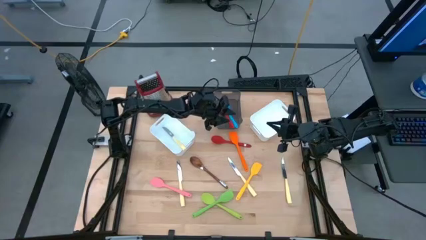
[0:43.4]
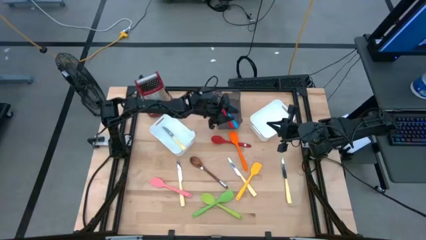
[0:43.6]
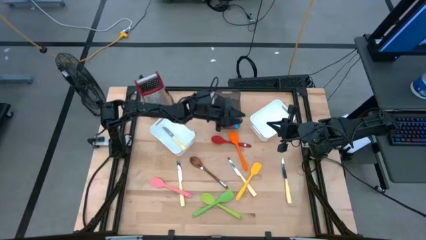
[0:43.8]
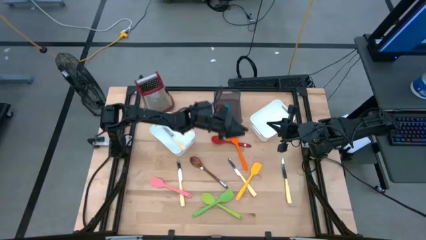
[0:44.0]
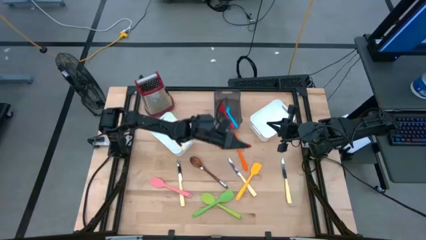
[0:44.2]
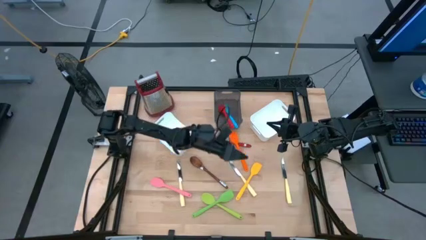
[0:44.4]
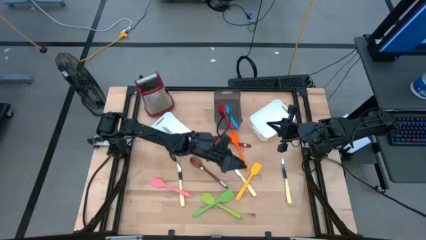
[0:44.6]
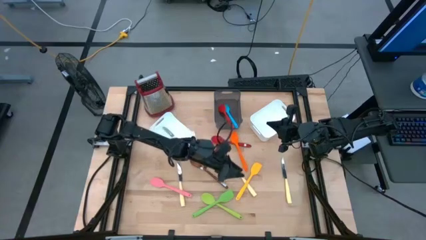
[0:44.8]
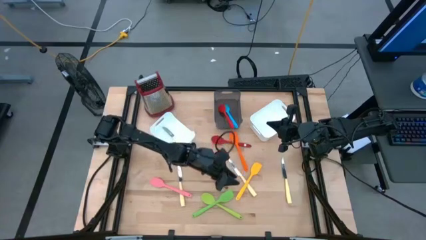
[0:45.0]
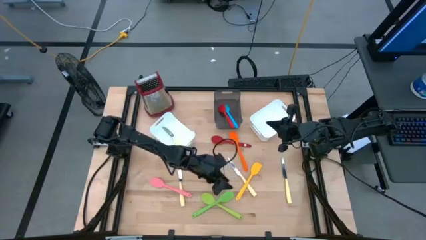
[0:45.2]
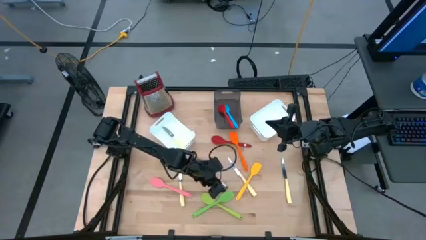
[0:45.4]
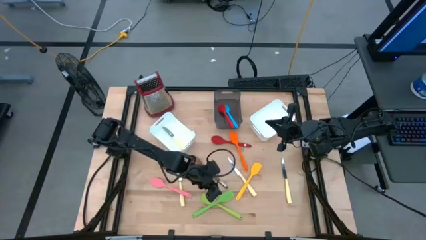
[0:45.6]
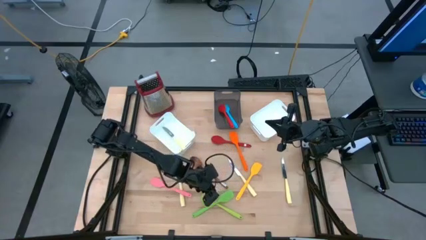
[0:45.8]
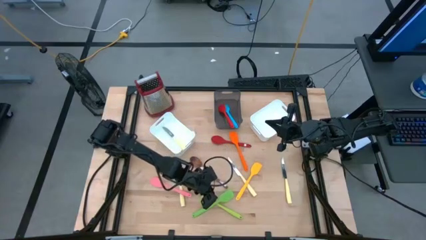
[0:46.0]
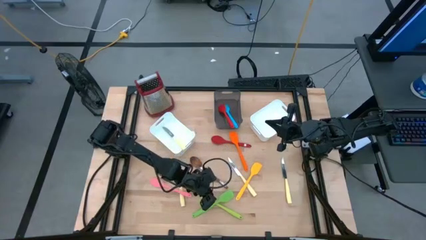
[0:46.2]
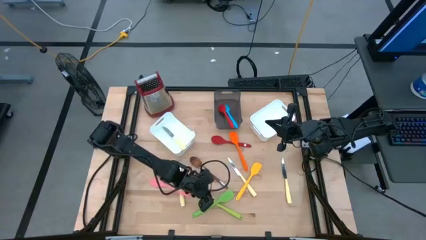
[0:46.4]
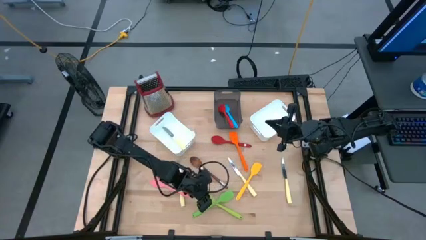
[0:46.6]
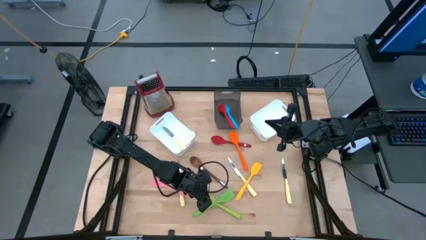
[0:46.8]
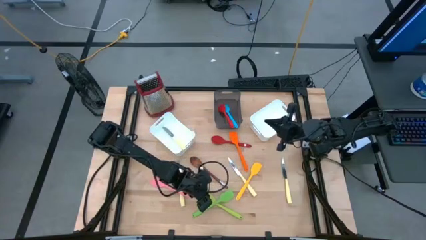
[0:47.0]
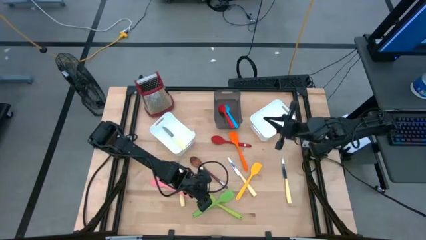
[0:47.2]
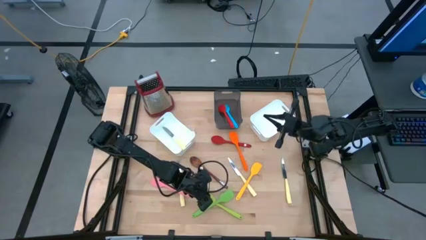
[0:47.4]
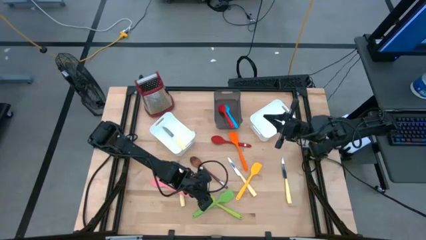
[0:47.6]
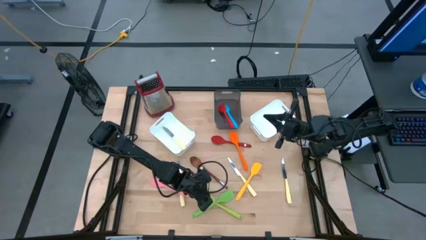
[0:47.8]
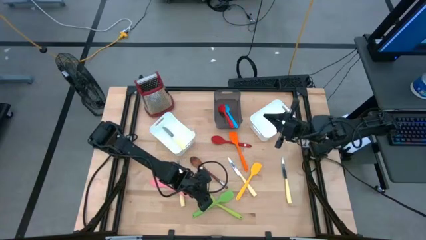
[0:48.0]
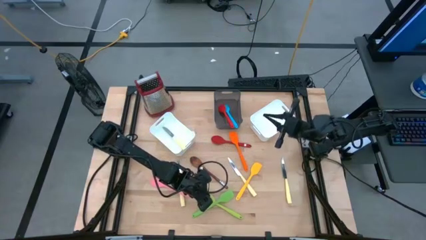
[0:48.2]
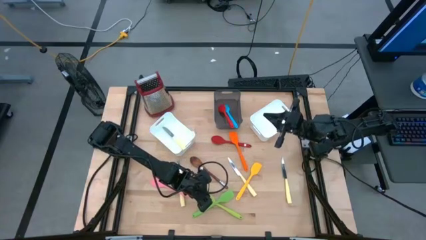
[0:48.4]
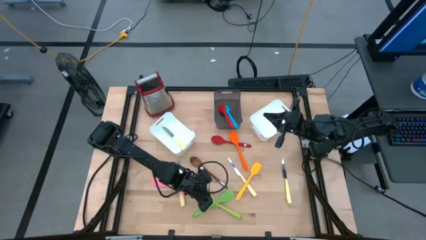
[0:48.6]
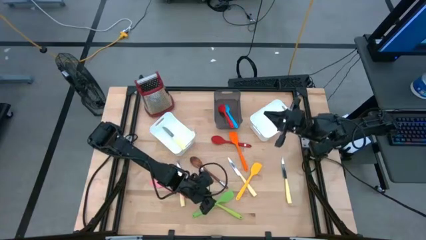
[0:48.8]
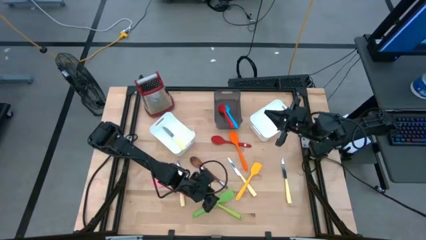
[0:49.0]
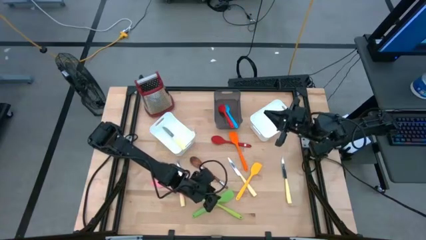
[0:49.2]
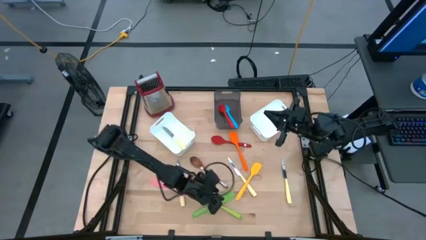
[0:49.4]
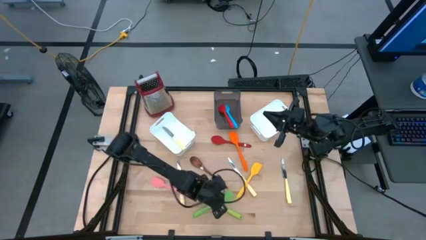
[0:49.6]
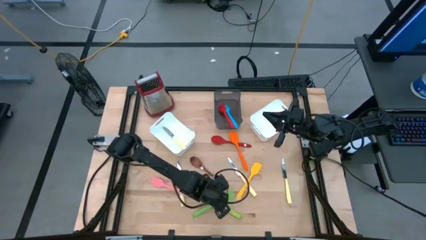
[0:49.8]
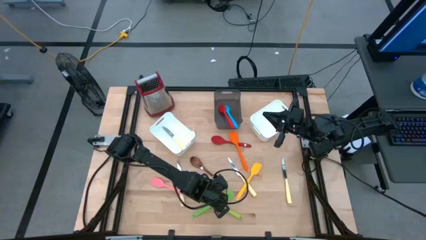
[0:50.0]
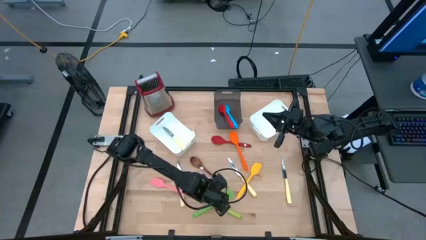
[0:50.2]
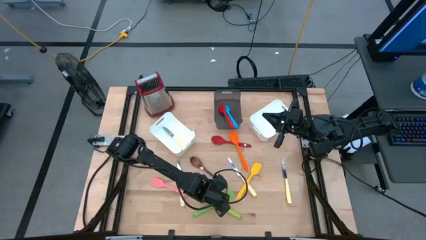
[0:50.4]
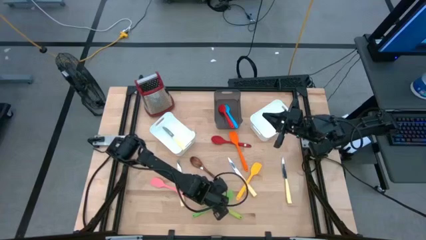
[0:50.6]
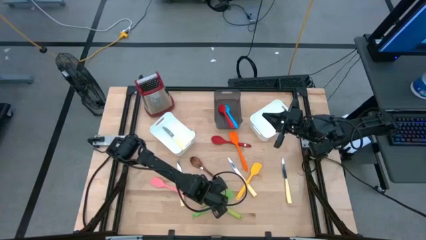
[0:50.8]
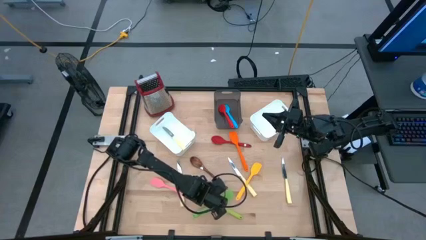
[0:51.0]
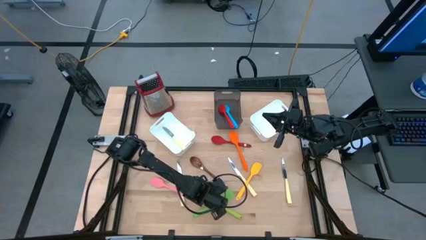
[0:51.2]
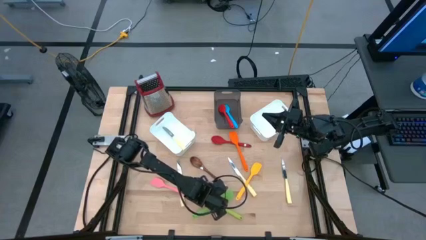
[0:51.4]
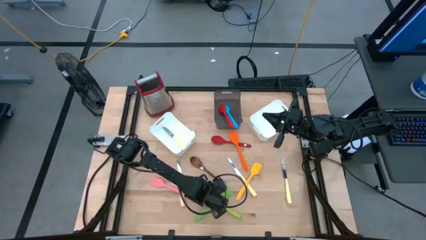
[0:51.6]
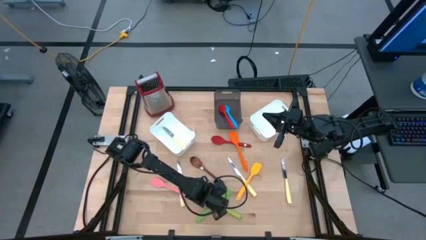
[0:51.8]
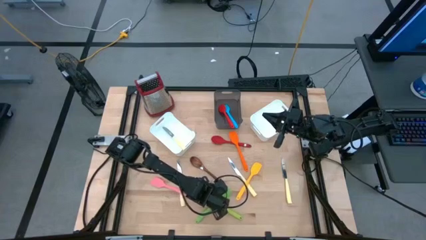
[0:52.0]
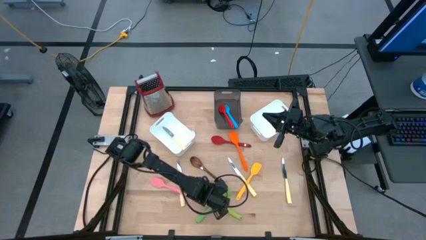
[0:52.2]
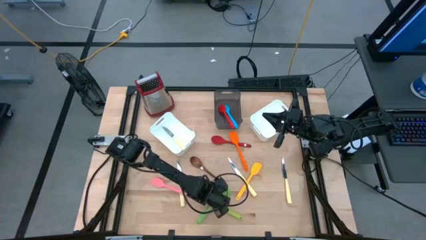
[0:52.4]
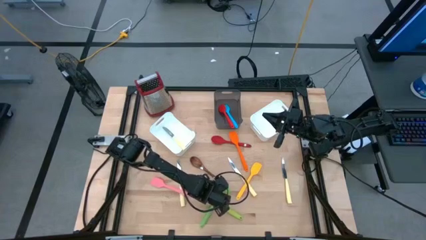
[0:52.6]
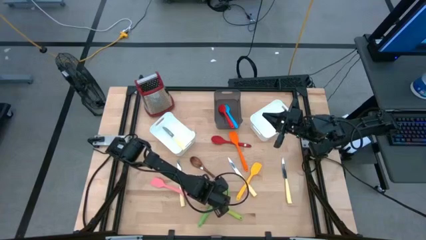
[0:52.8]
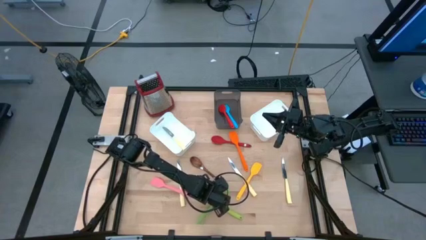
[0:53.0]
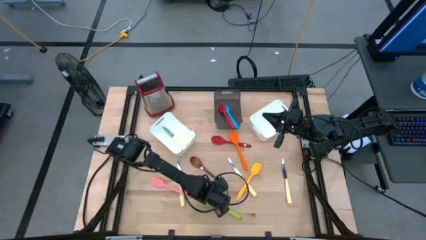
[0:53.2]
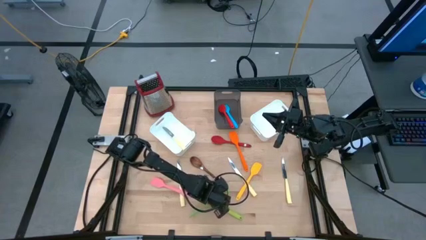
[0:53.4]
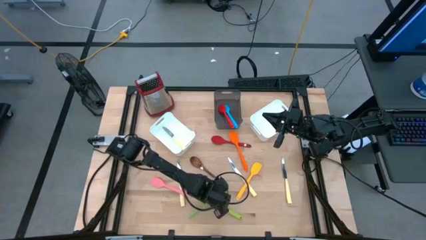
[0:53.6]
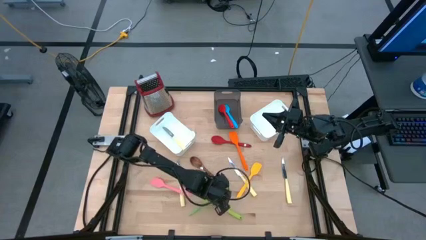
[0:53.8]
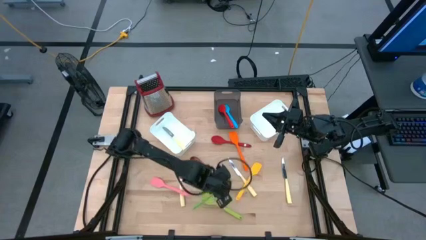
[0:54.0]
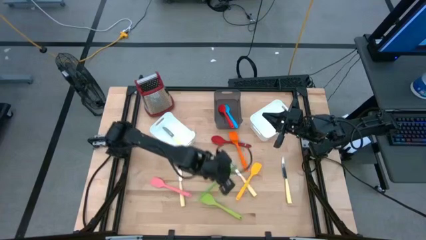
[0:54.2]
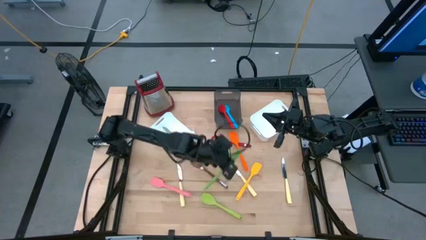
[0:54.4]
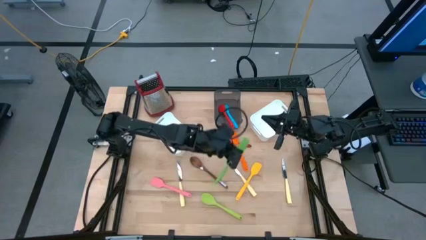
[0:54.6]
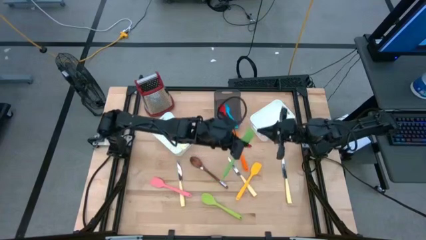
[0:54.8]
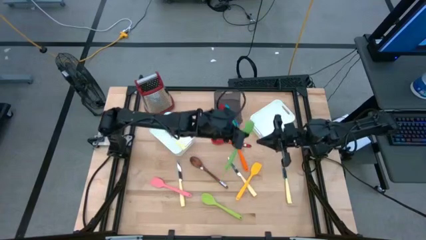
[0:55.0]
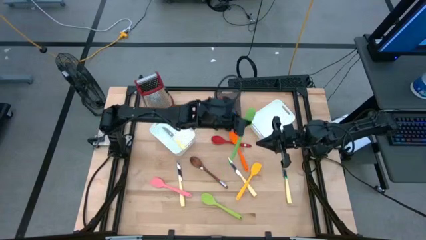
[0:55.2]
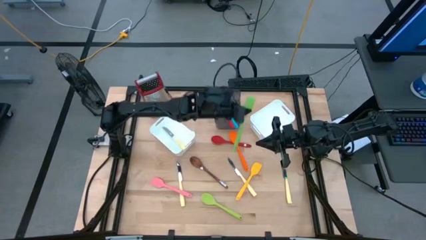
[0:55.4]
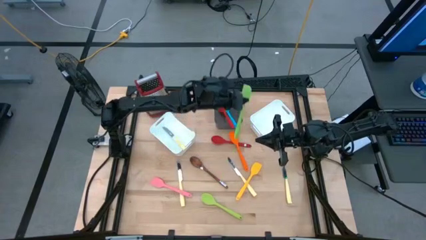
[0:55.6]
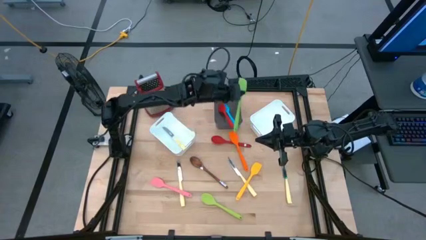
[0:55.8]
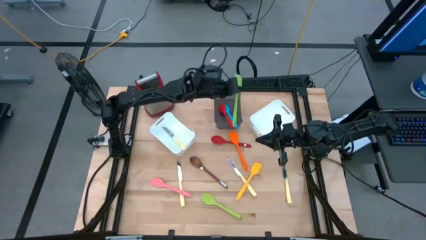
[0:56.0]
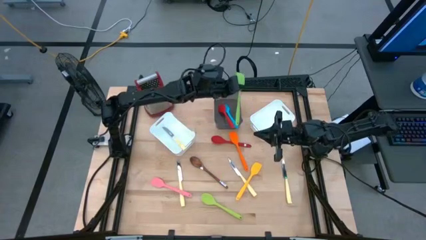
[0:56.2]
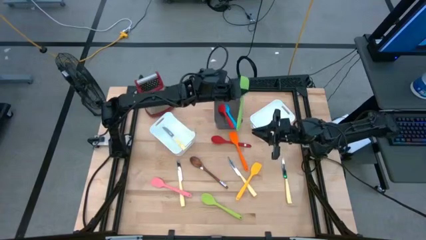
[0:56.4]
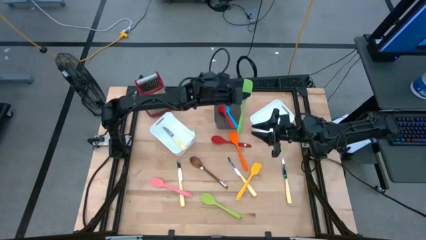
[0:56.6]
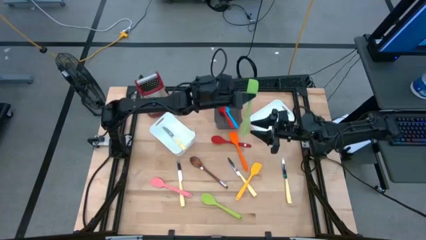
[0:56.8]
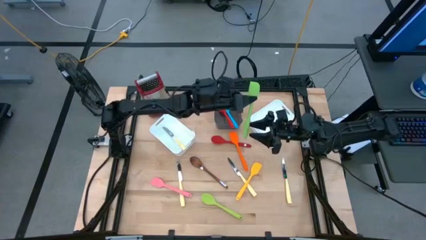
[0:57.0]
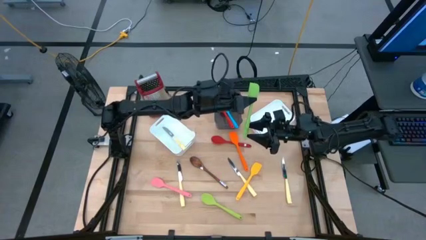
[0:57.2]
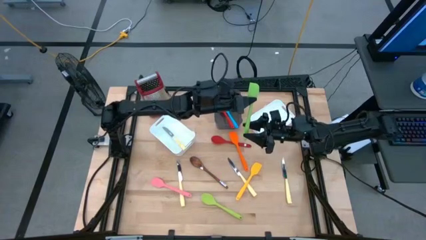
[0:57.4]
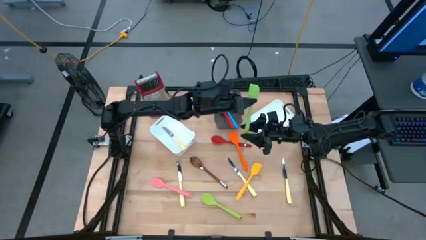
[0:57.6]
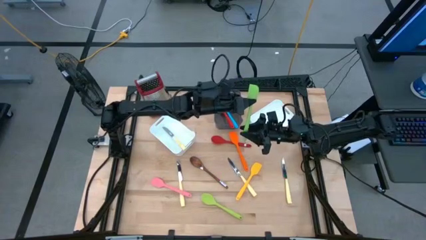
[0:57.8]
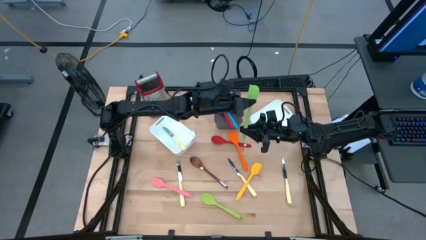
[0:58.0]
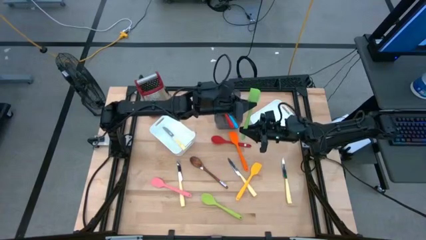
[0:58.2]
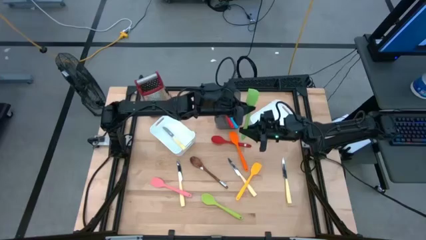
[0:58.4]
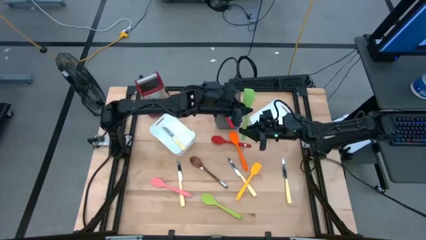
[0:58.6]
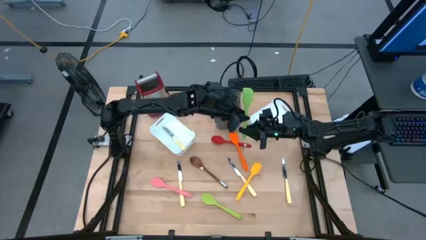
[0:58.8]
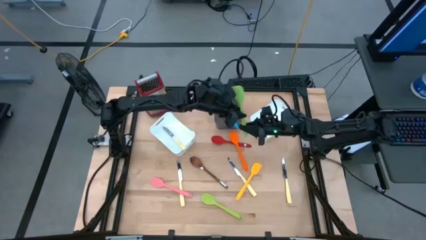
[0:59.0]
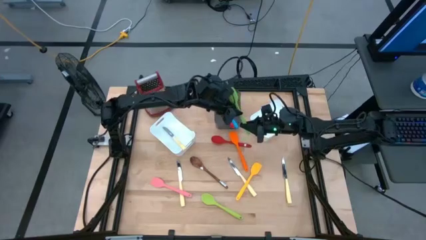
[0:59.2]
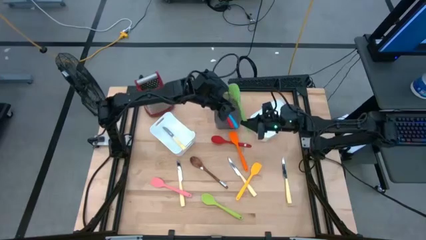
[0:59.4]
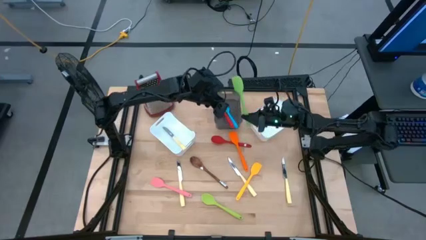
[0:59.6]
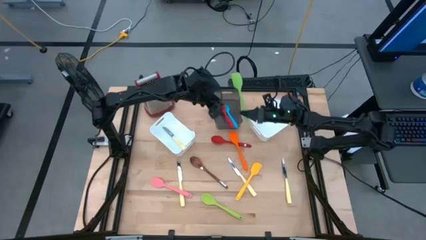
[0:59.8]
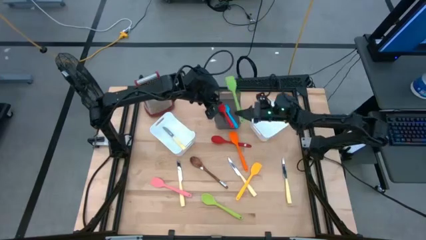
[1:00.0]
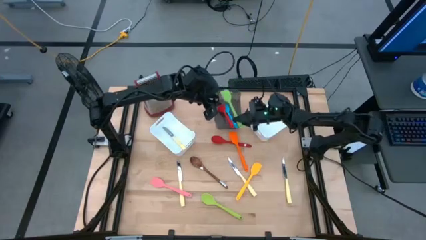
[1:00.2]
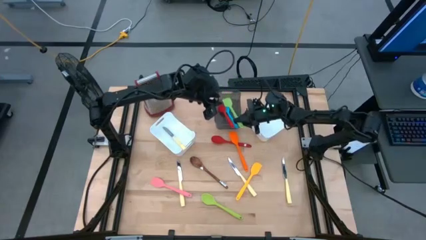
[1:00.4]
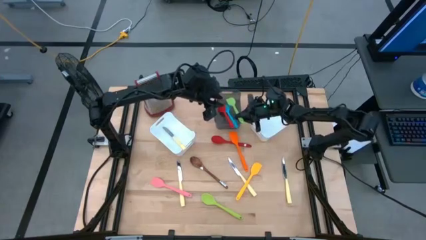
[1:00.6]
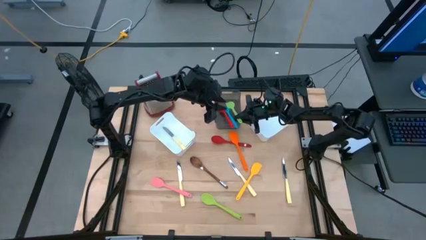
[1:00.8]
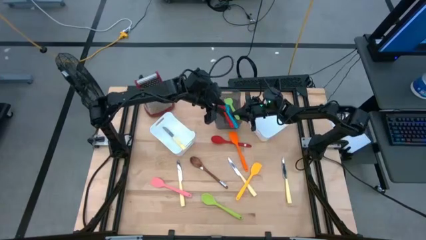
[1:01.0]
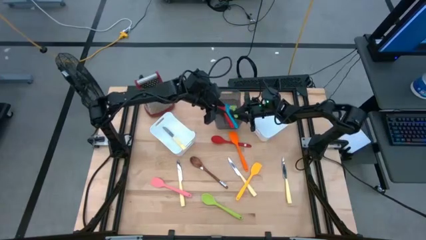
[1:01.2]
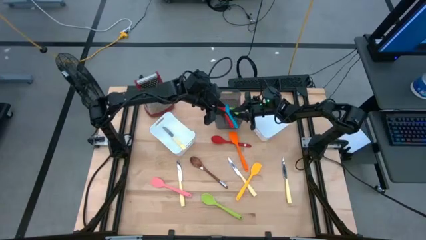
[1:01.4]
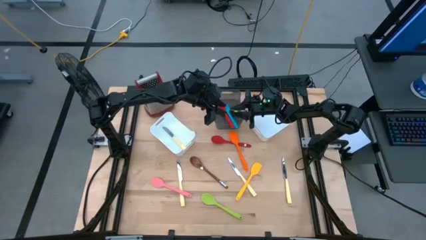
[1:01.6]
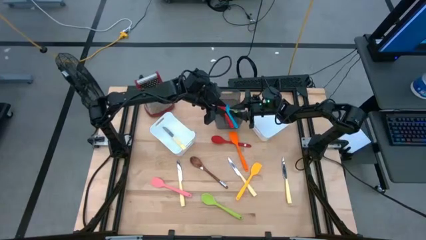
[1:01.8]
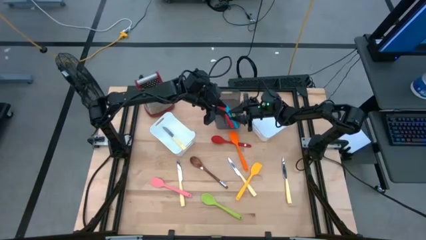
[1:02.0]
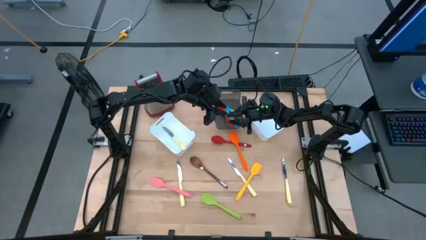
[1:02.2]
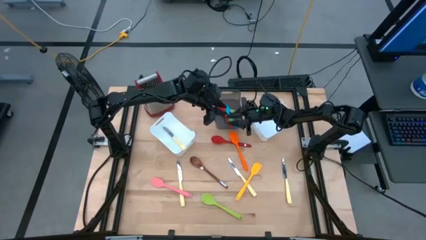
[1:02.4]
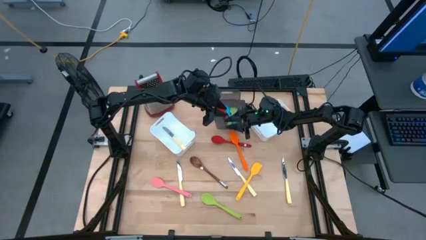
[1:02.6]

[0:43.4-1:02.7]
Task: Pick & Place Kitchen Items
Put the green spatula into the black bin
